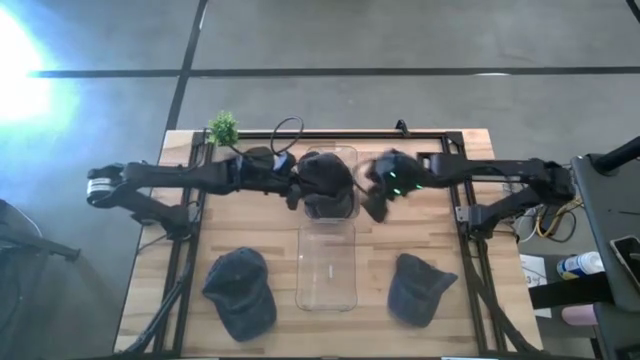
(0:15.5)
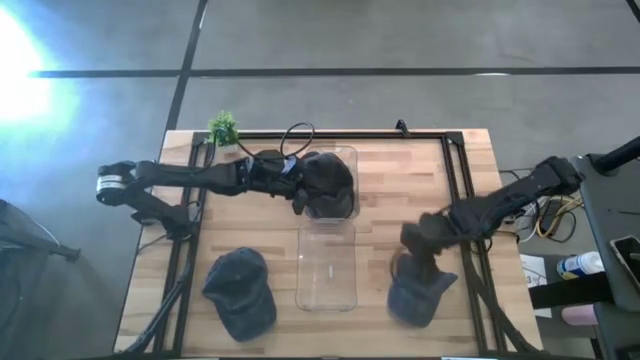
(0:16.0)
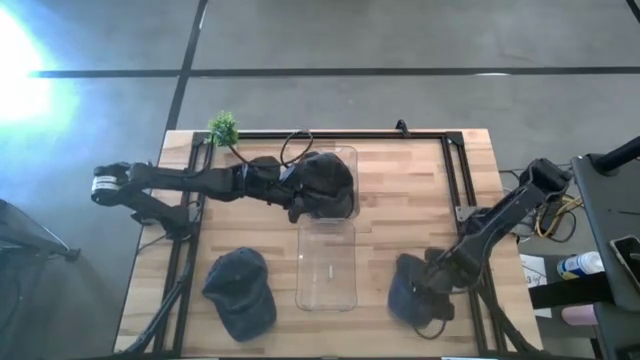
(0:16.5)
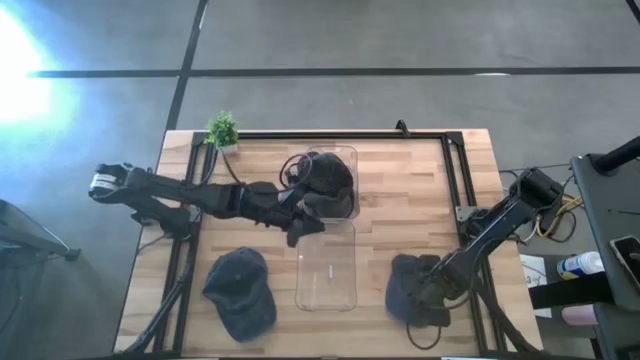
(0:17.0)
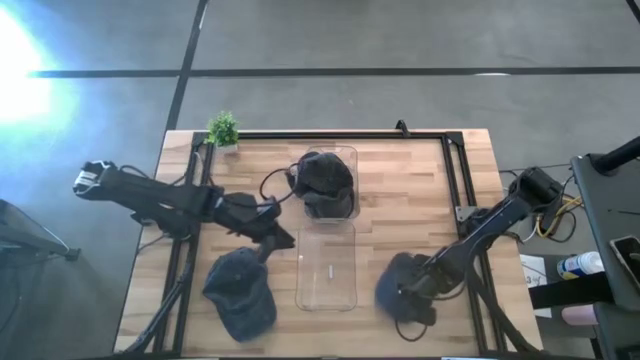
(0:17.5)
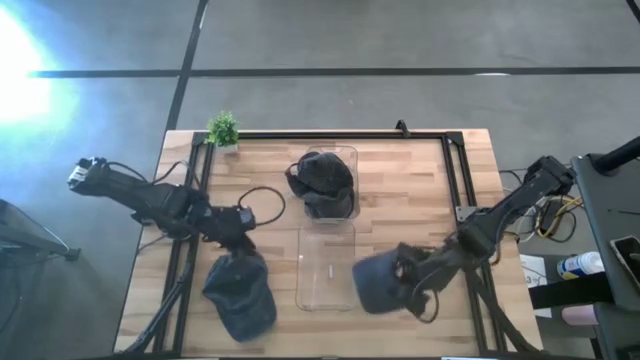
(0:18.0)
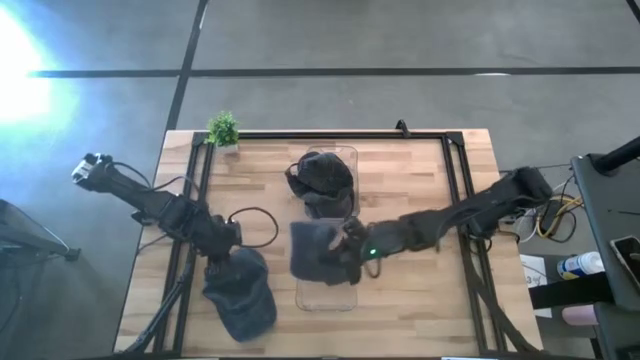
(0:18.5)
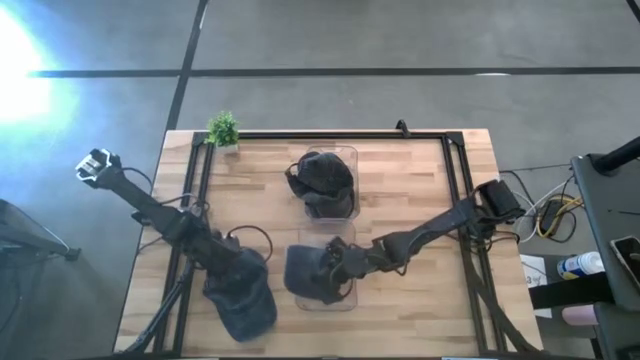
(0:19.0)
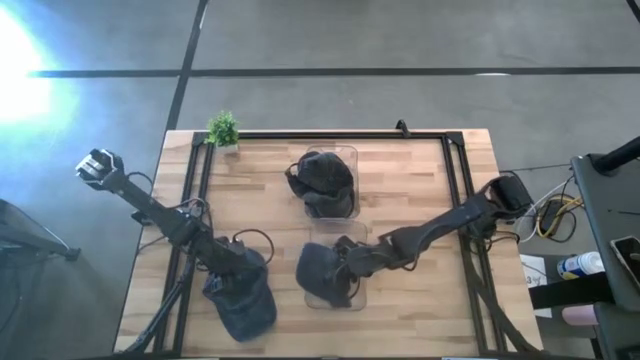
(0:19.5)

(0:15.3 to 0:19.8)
Task: Pick & Place hat
Put the right blue cap into the bottom transparent bin

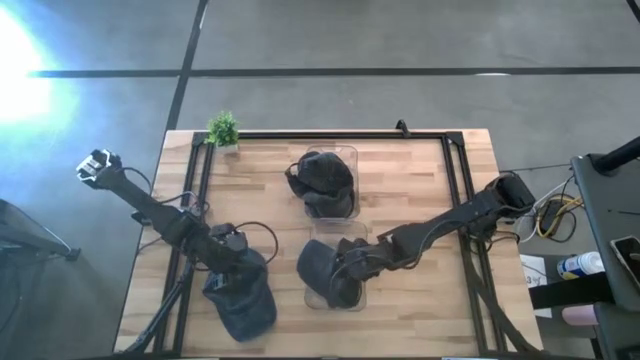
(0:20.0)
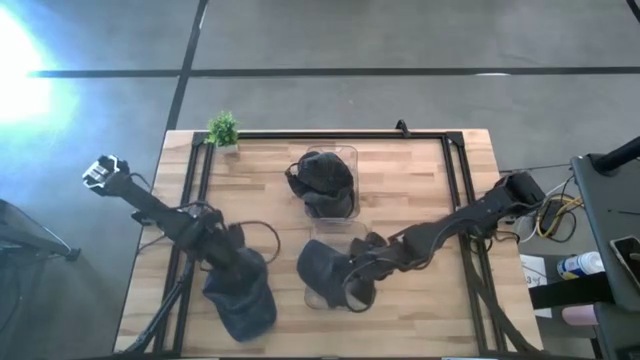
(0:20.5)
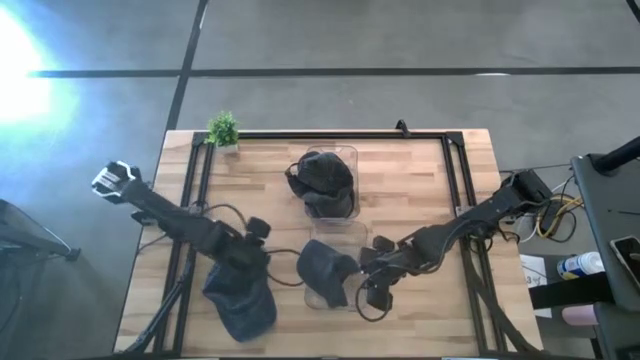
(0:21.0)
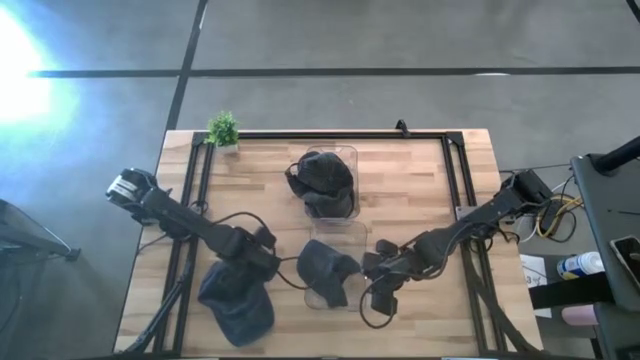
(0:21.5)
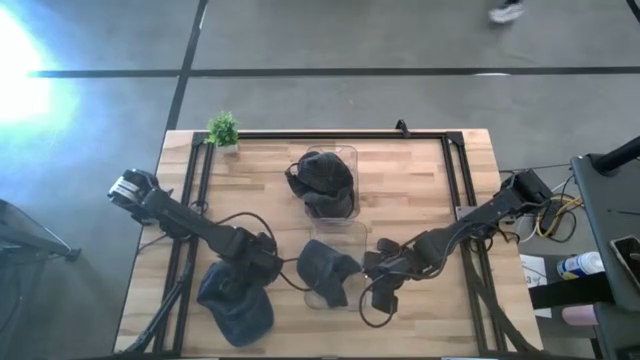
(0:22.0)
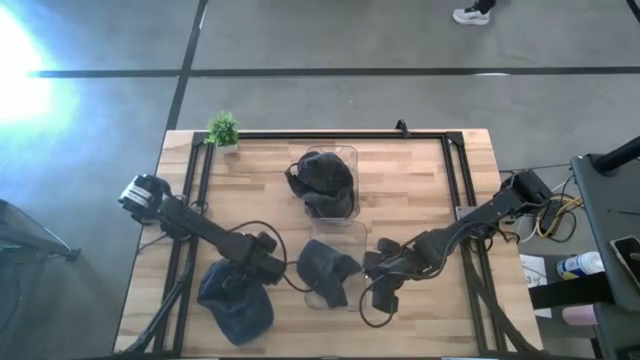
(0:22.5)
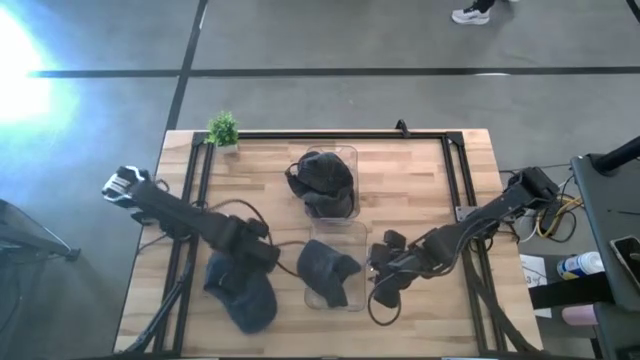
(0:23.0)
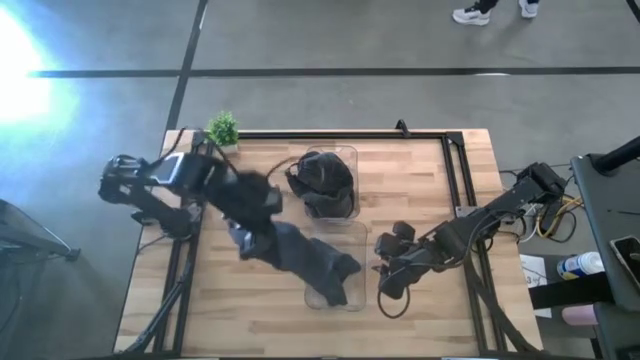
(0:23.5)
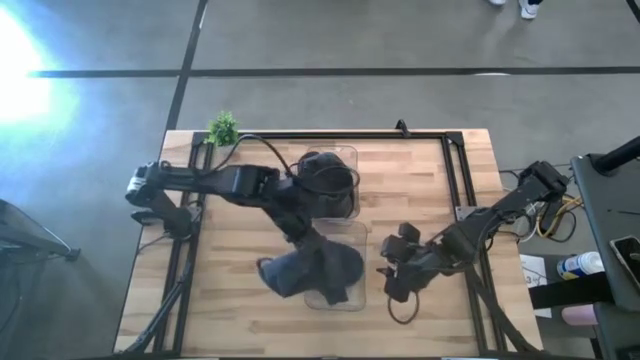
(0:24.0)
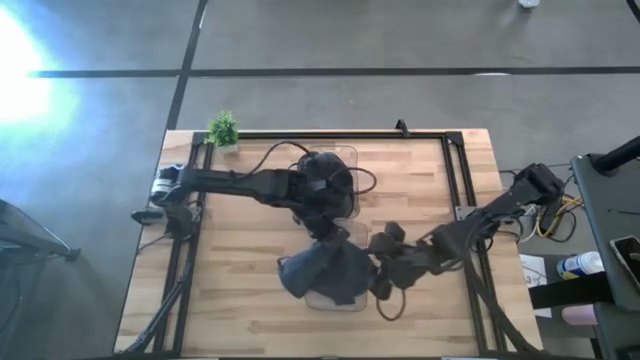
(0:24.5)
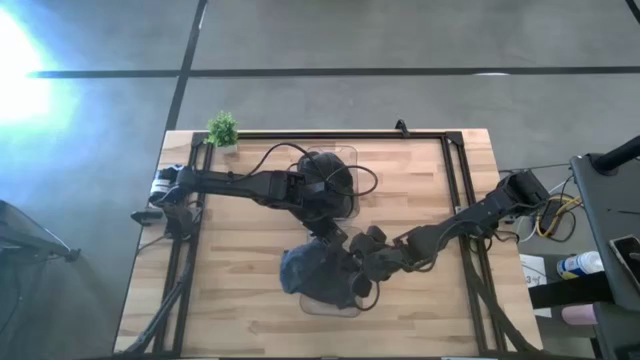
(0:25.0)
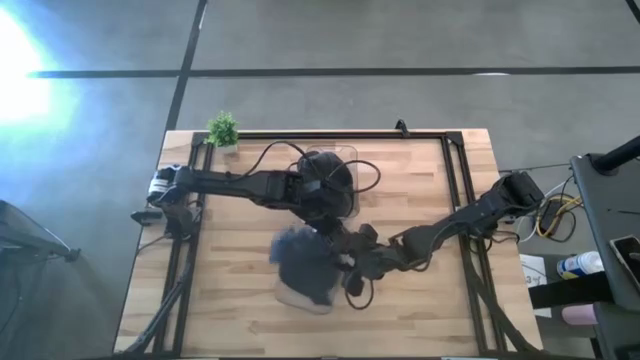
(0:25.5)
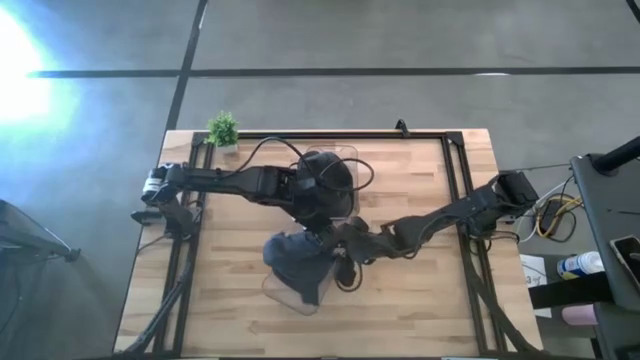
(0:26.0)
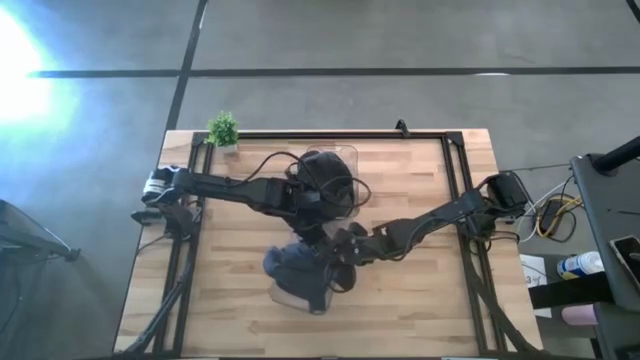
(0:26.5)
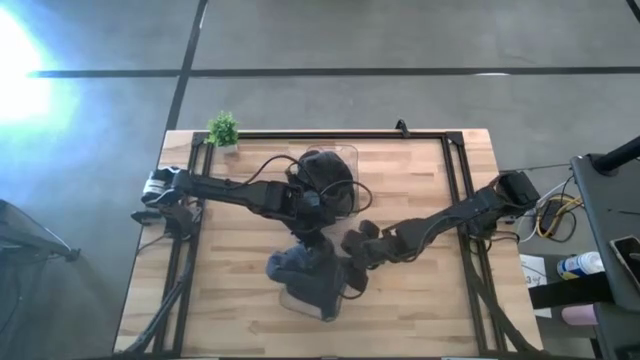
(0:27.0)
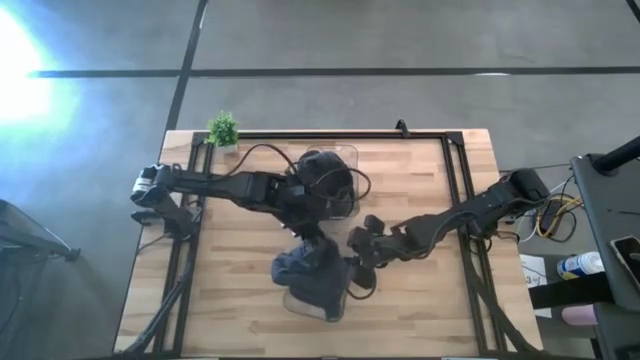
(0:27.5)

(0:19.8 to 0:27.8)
Put the blue cap into the bottom transparent bin

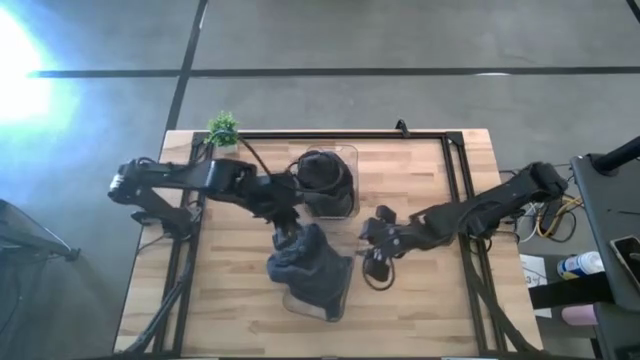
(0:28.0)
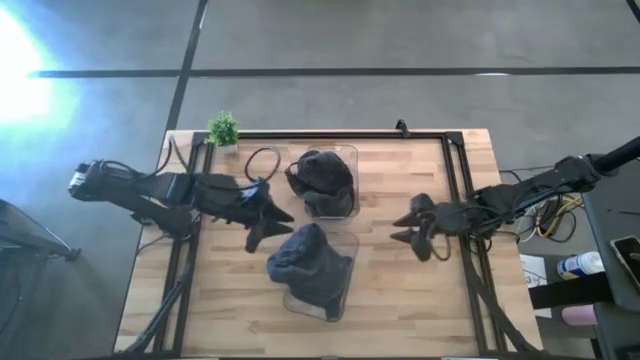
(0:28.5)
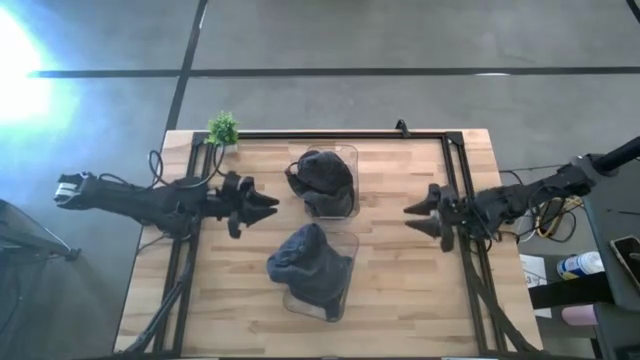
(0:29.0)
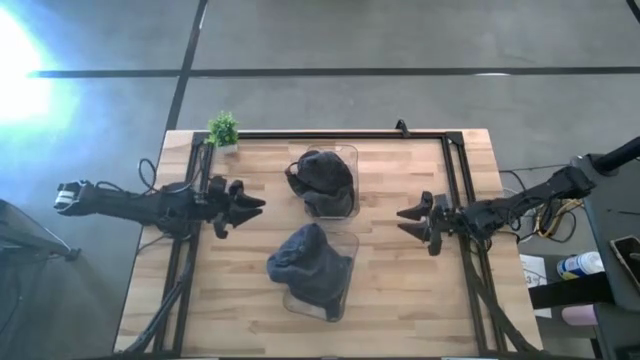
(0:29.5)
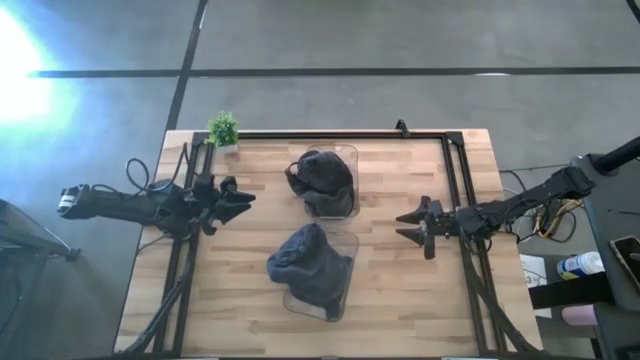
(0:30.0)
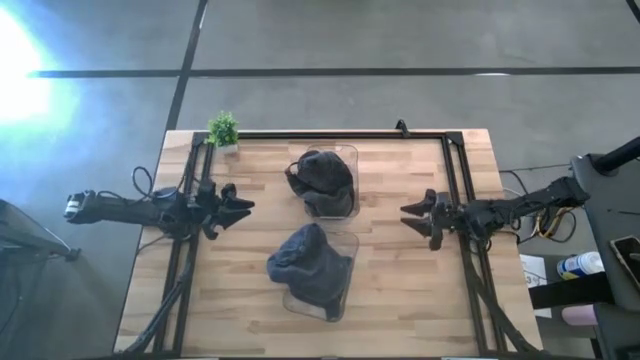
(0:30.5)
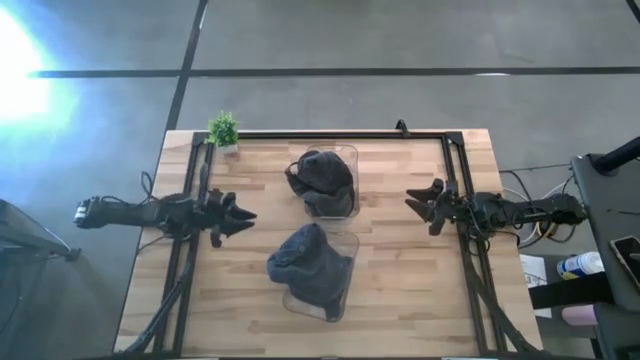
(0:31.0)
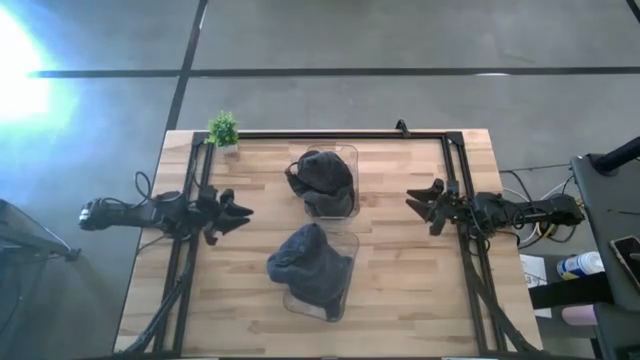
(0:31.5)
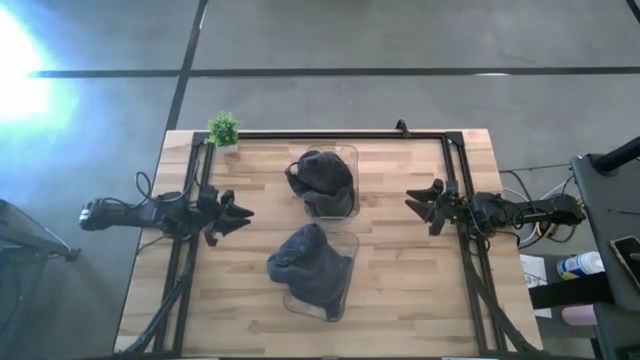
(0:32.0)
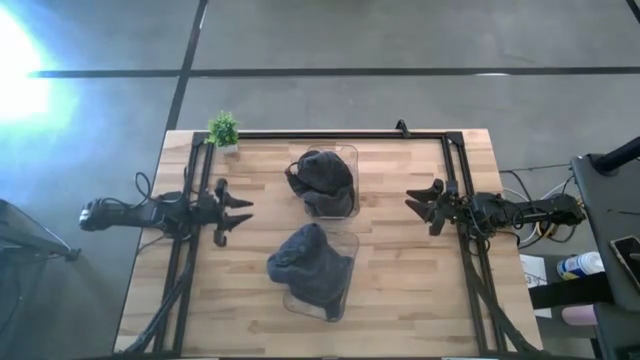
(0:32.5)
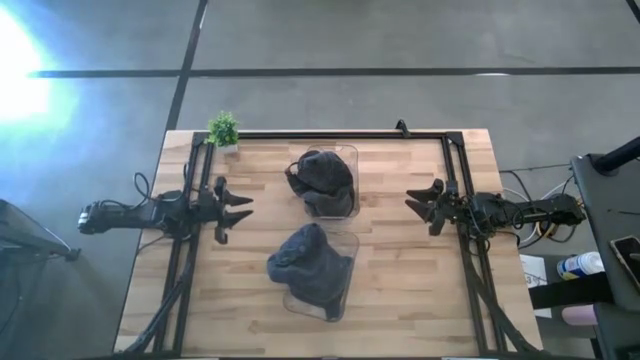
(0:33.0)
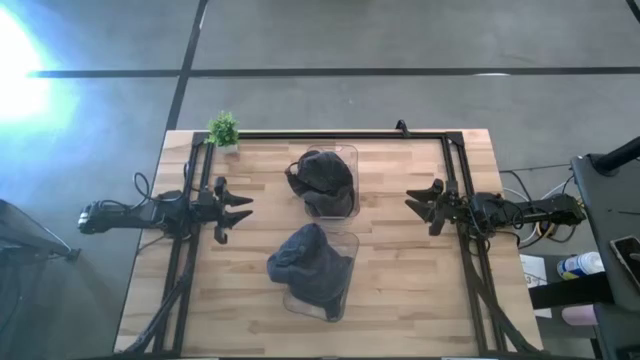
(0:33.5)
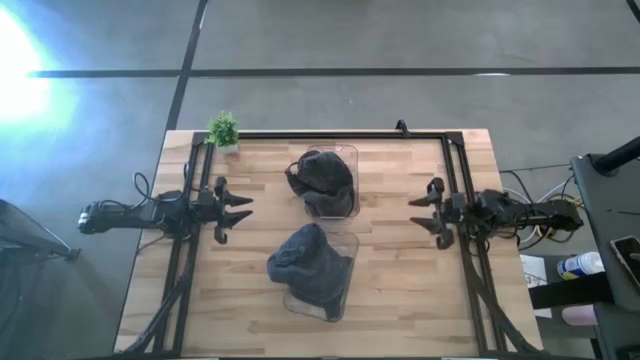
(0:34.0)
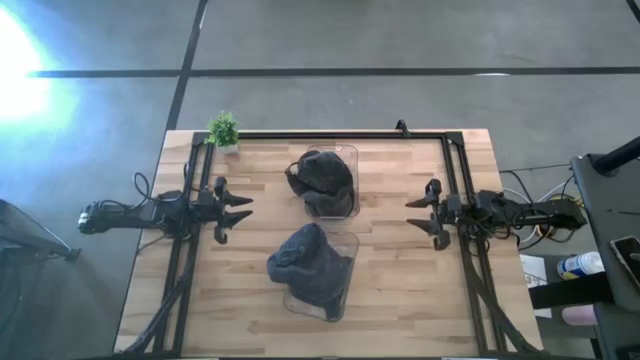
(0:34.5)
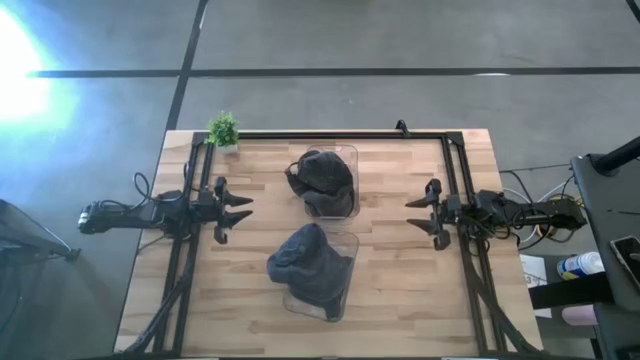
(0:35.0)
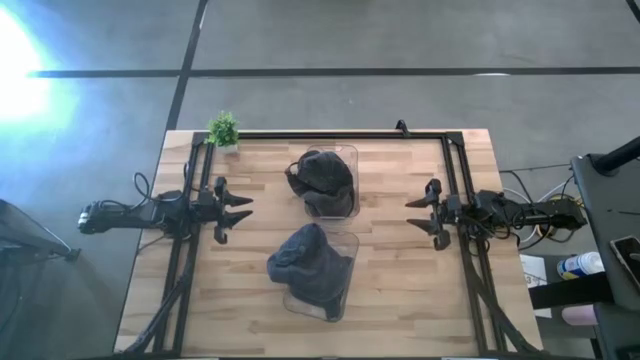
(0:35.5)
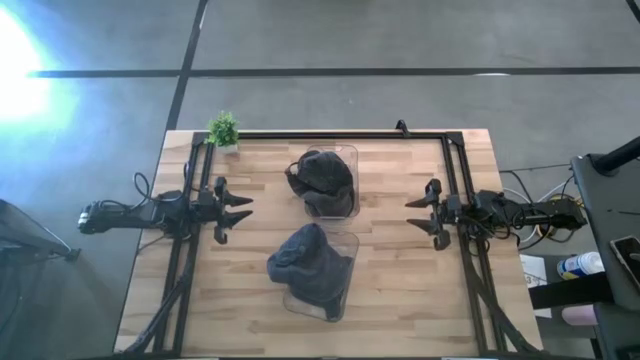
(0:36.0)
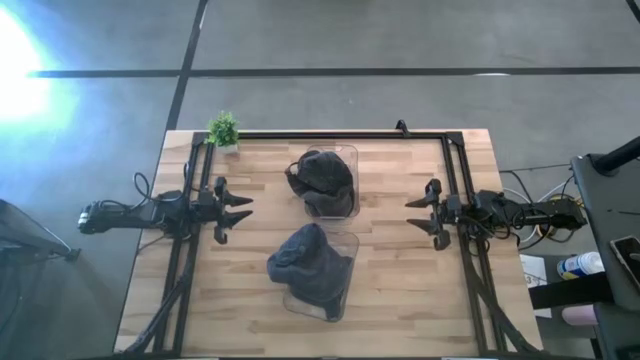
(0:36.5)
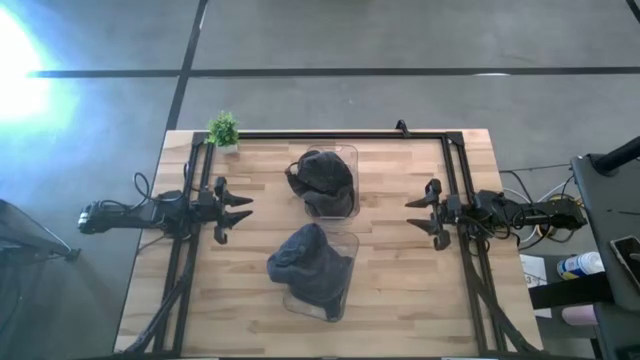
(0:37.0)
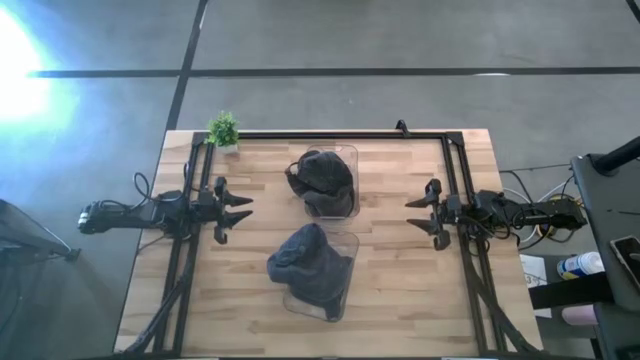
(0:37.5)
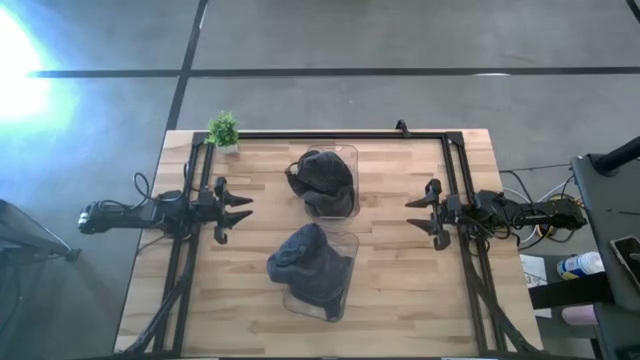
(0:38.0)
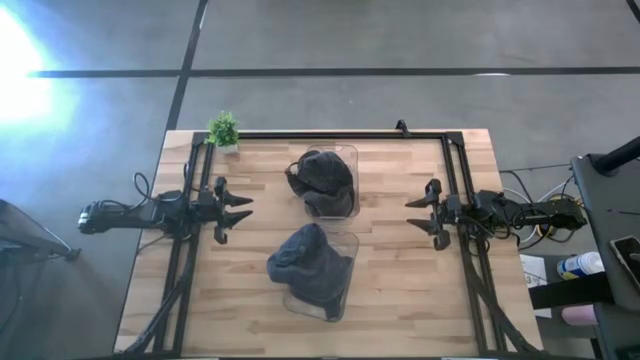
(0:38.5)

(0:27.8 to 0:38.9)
Return to Home Position
